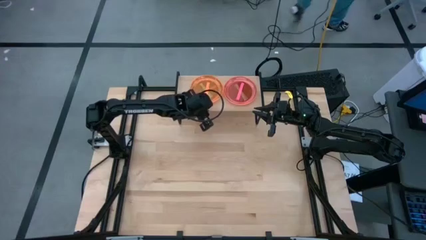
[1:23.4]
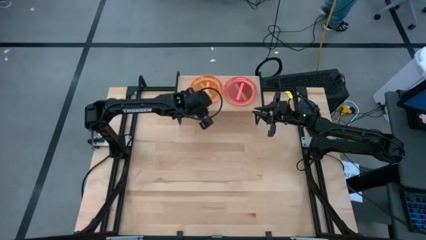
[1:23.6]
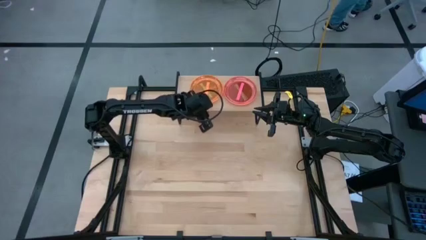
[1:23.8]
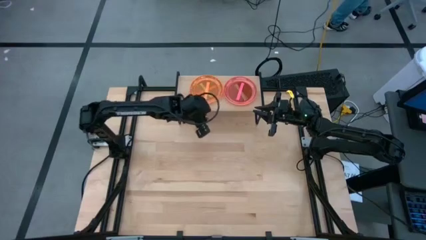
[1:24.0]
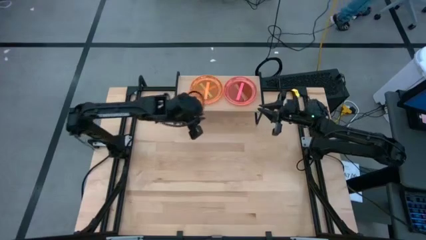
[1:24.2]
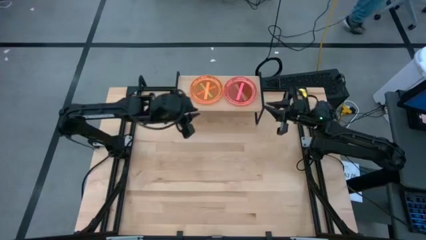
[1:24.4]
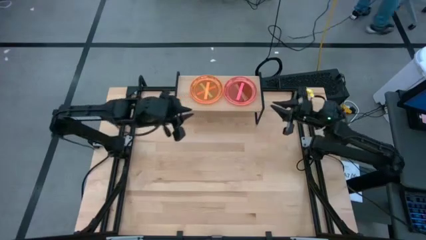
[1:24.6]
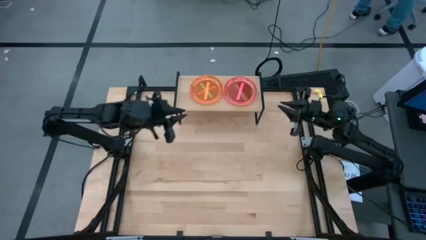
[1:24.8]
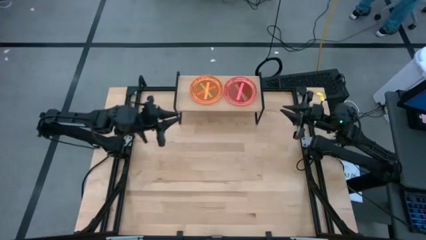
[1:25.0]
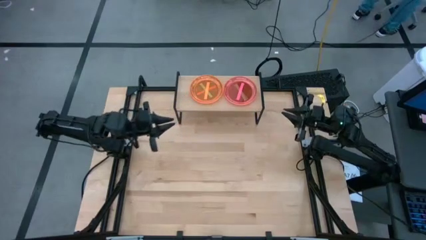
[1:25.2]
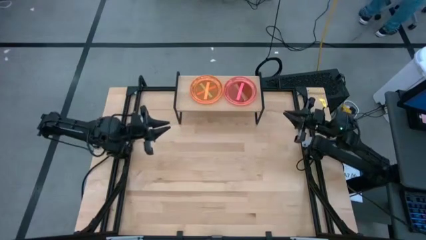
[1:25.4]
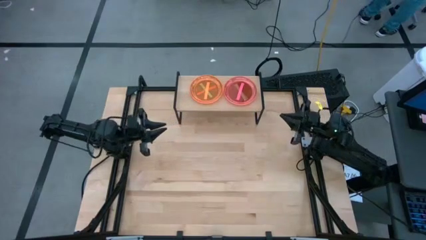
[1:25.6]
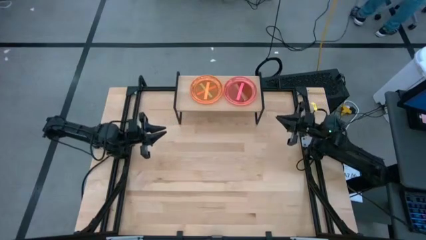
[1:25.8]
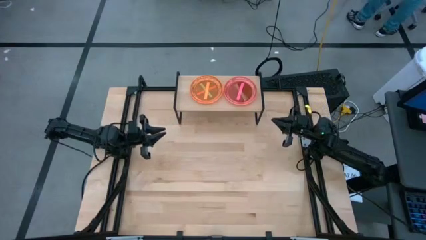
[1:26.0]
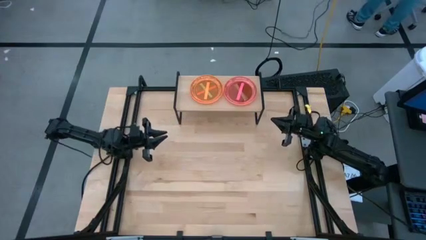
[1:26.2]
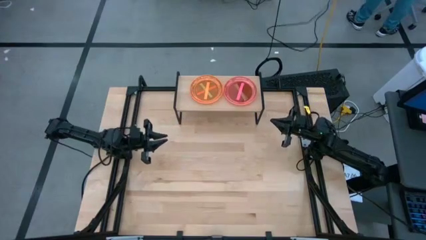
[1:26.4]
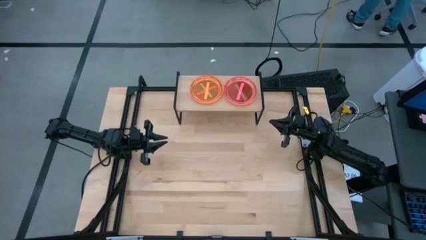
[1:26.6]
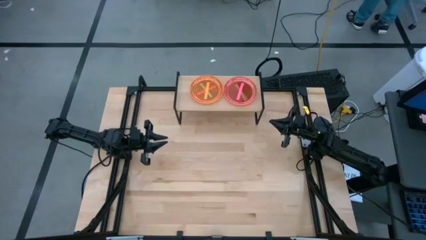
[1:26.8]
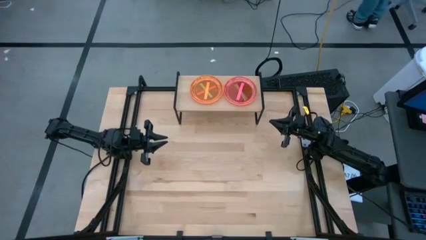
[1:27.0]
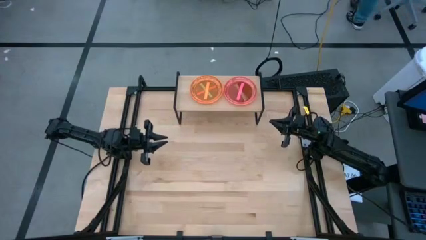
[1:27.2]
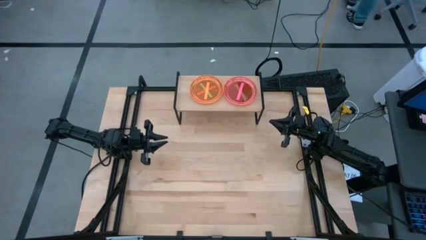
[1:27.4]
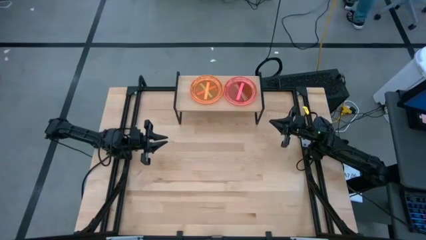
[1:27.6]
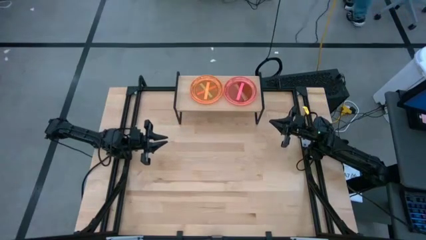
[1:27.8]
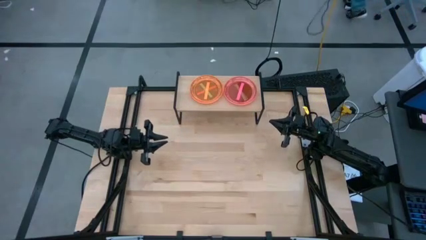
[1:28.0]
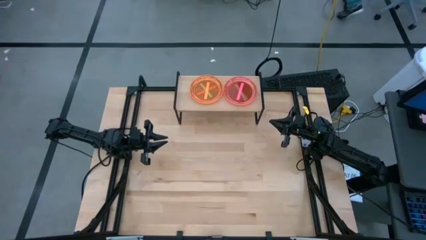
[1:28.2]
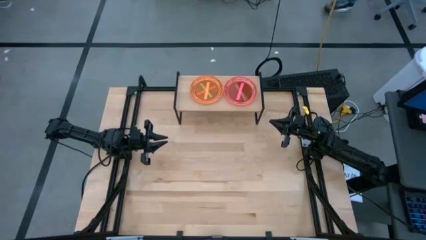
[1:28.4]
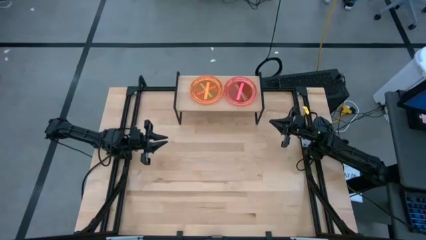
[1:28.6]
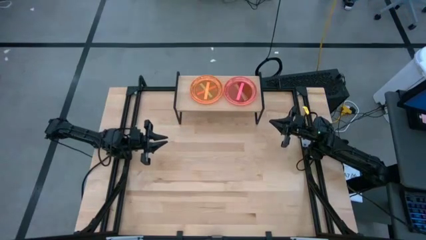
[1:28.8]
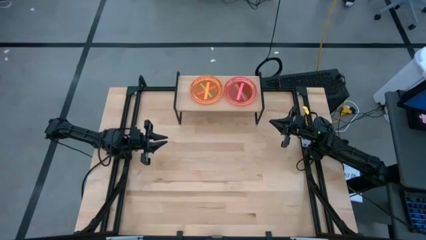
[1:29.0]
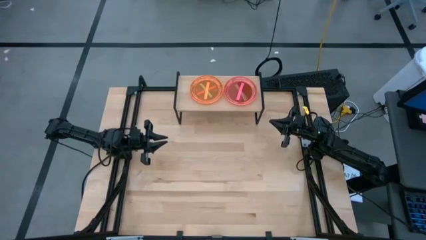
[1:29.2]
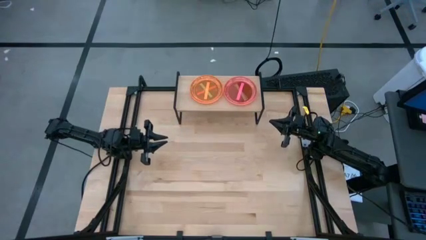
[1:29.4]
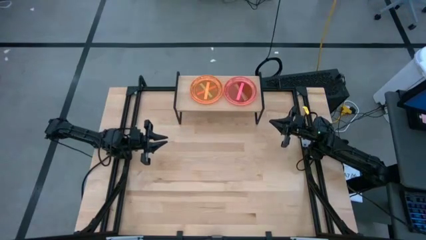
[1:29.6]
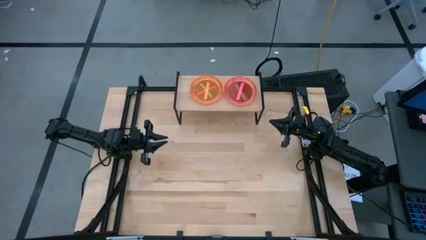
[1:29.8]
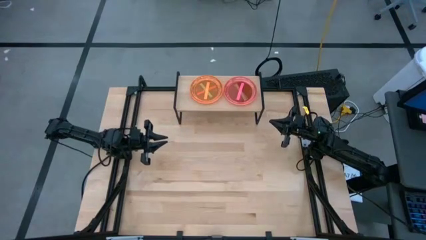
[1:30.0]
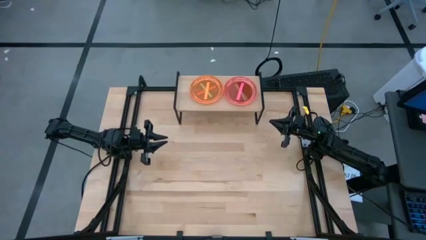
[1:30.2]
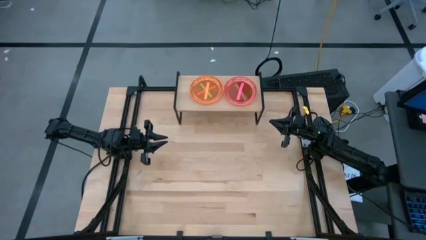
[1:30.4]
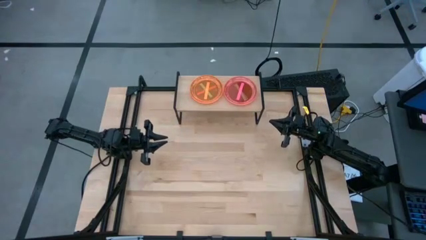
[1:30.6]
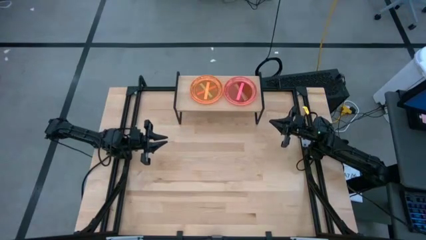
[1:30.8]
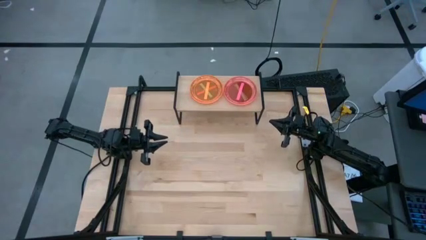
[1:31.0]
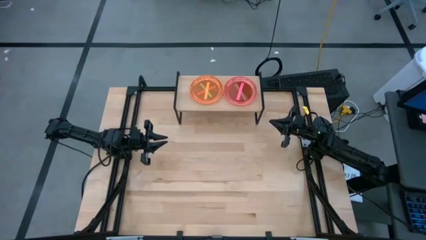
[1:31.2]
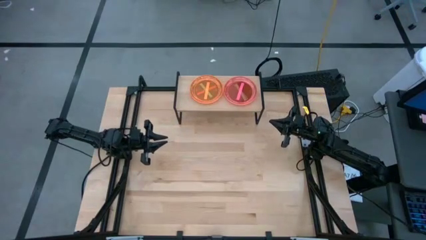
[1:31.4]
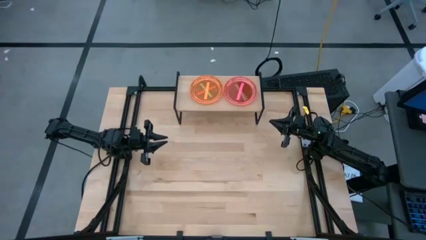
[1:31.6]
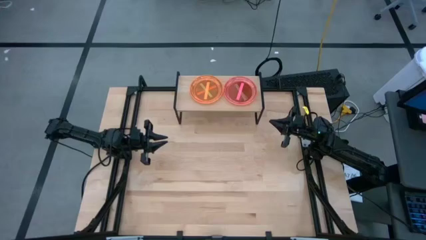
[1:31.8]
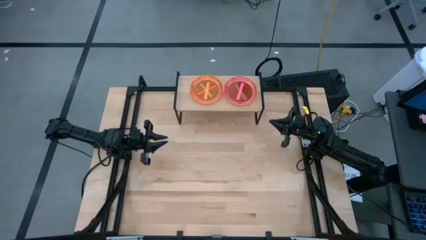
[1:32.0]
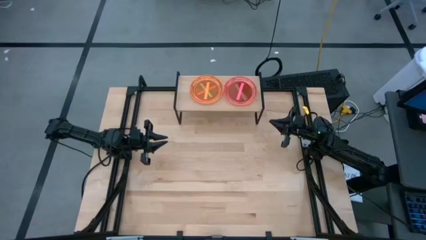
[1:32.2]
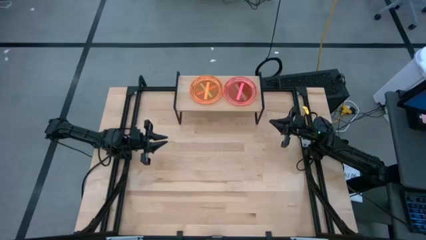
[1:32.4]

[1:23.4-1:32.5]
Task: Place and stack plates onto a shelf
Return to Home Position

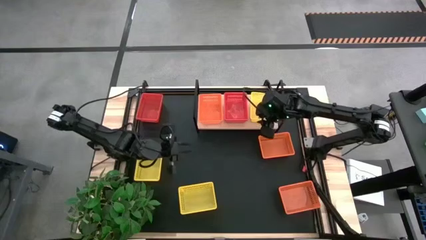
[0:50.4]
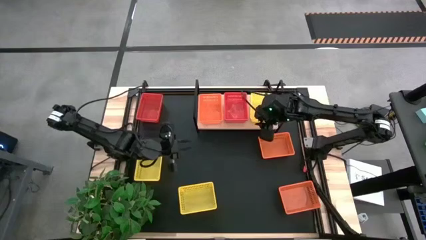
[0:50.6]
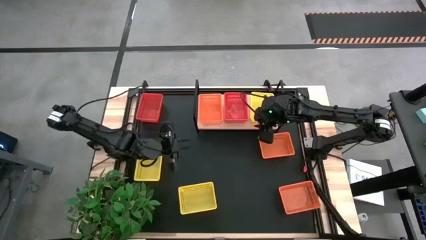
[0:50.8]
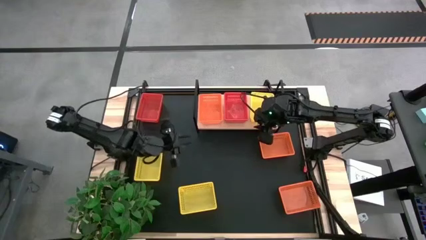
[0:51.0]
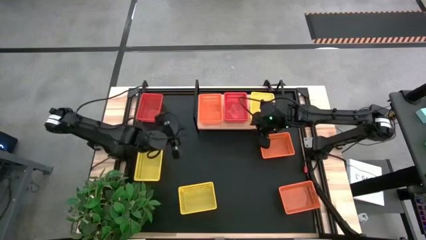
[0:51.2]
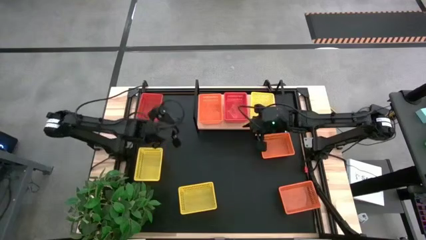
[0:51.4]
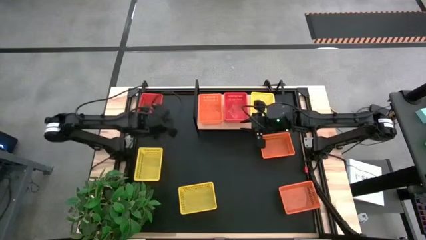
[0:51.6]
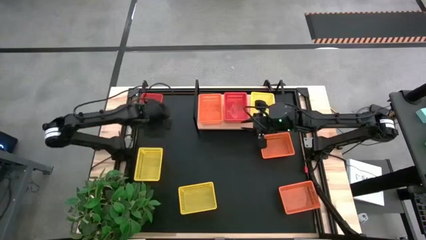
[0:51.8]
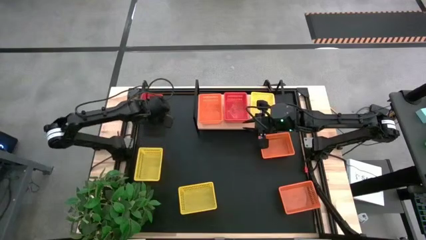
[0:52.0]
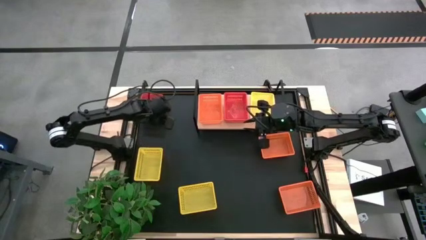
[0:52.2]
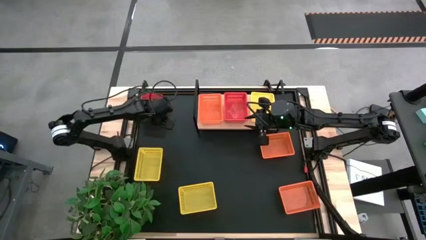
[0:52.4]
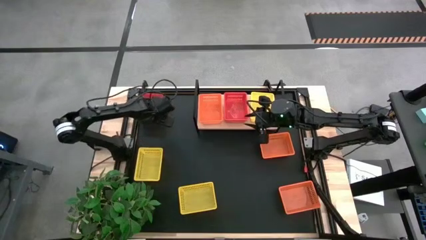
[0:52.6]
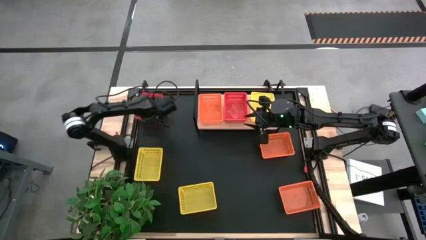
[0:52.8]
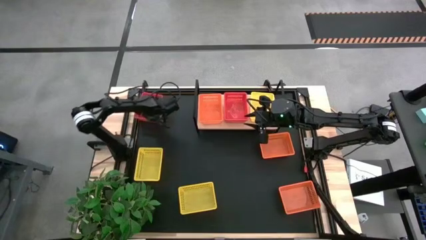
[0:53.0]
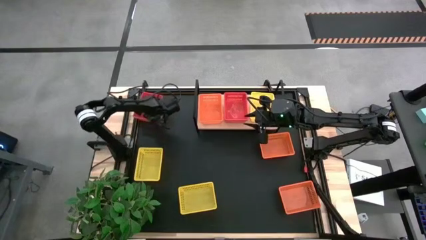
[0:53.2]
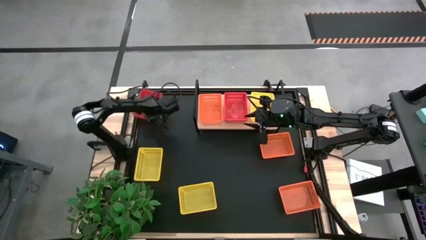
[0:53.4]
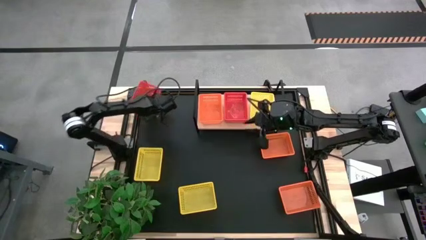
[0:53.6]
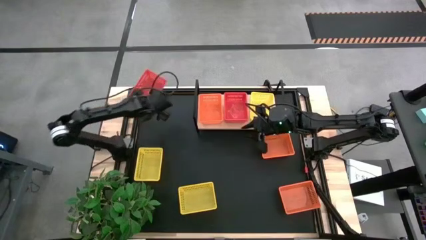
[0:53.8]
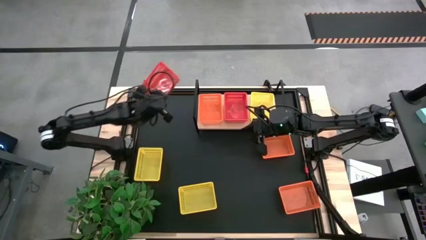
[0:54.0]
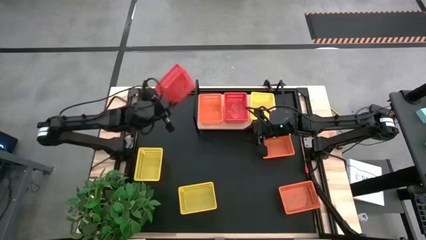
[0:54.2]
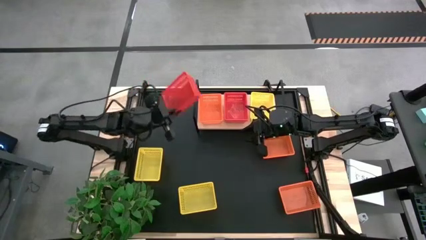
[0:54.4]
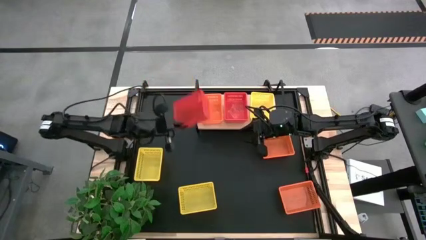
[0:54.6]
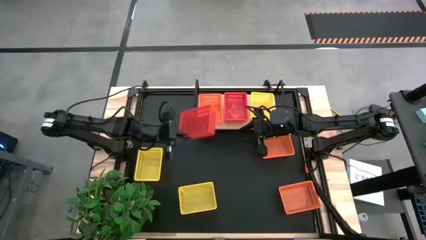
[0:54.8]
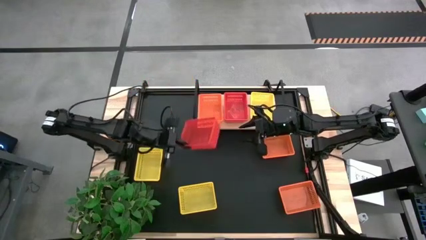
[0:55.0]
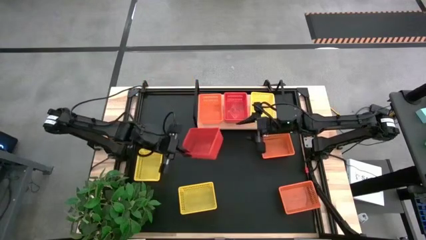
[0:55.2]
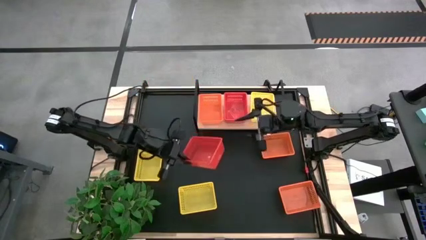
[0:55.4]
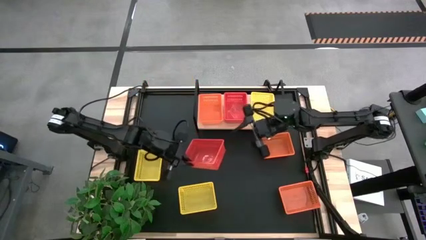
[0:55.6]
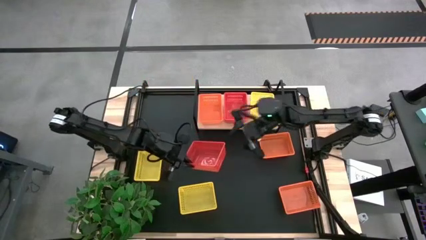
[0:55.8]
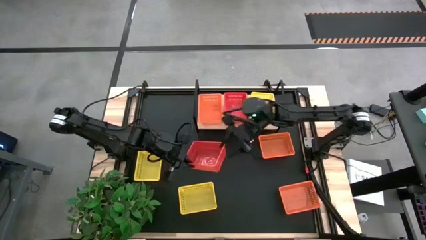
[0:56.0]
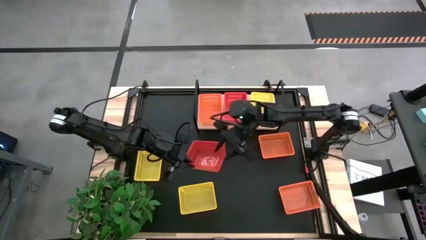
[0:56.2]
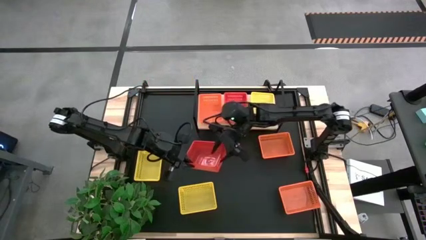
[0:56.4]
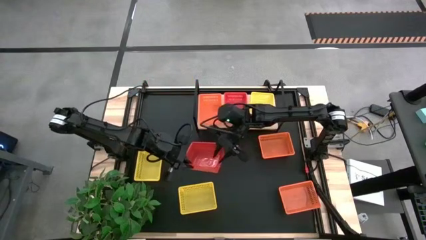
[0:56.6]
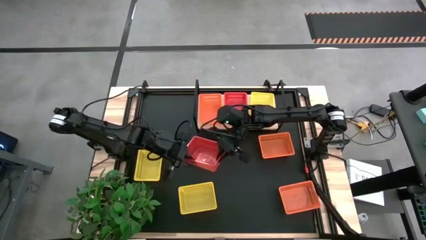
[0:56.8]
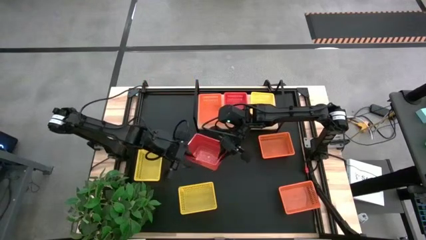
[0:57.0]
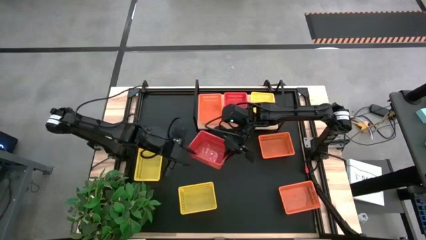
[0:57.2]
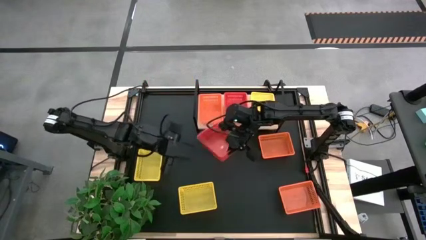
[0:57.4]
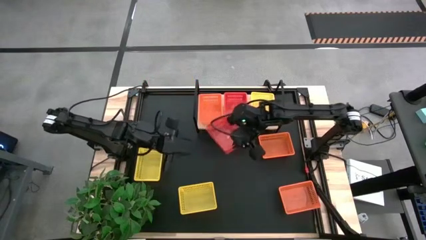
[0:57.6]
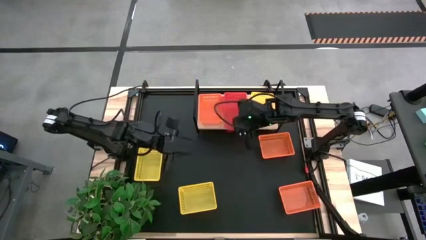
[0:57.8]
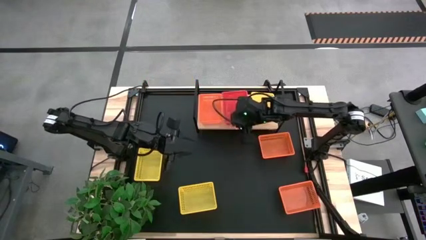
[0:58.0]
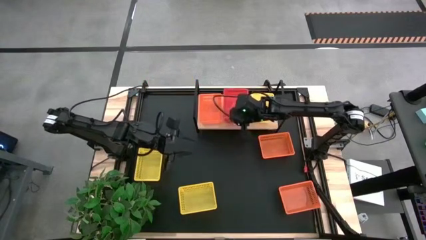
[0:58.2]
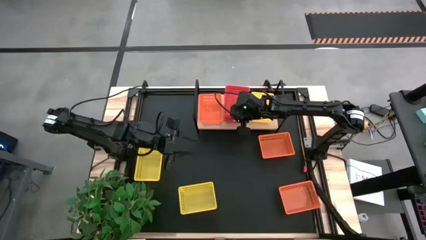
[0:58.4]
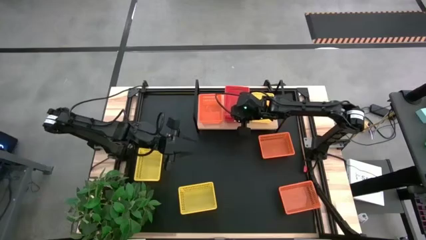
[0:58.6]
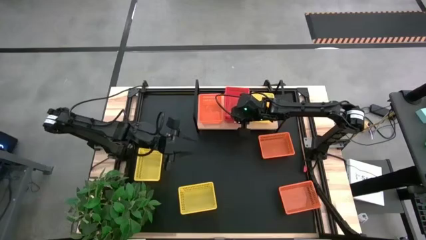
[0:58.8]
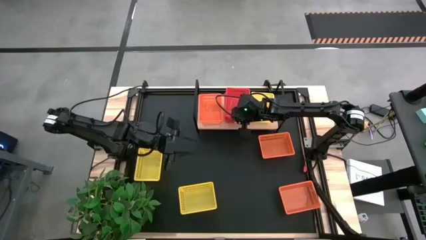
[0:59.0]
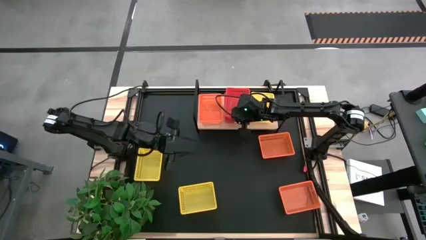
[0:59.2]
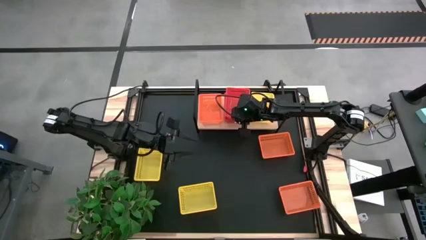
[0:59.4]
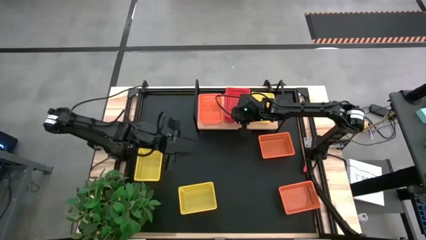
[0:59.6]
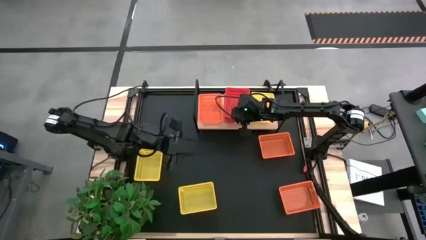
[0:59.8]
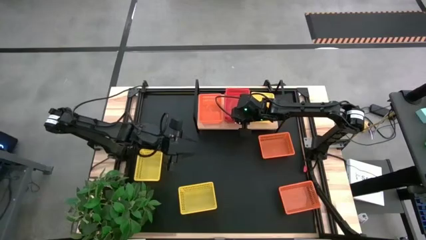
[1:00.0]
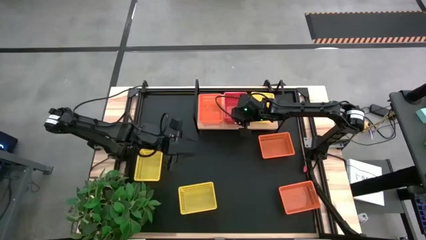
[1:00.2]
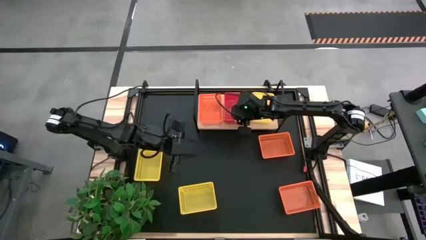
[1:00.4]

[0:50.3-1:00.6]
Task: Stack baskets on shelf by color
Stack the red basket on top of the red basket on the shelf
